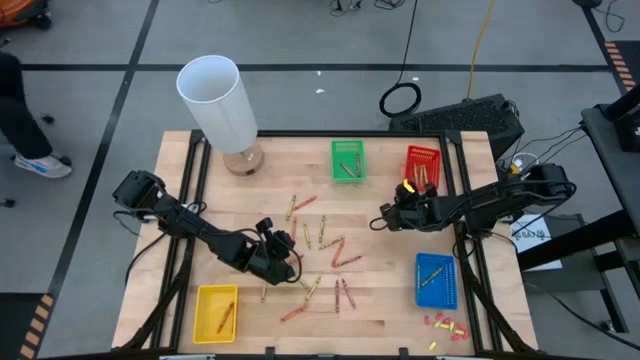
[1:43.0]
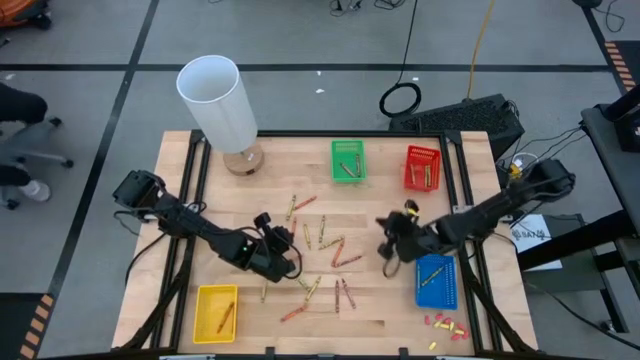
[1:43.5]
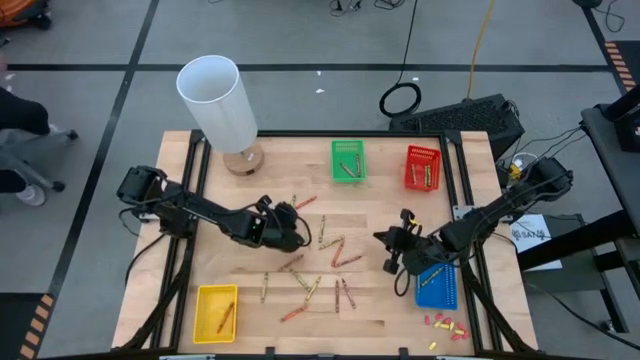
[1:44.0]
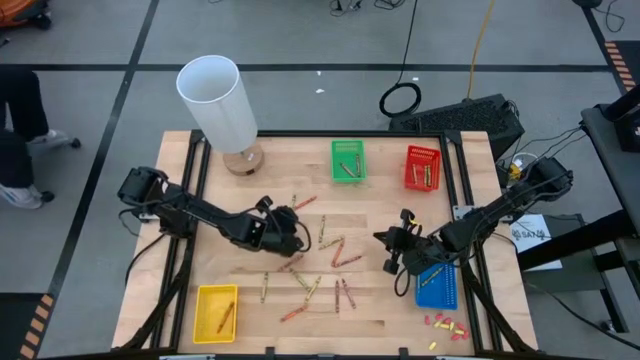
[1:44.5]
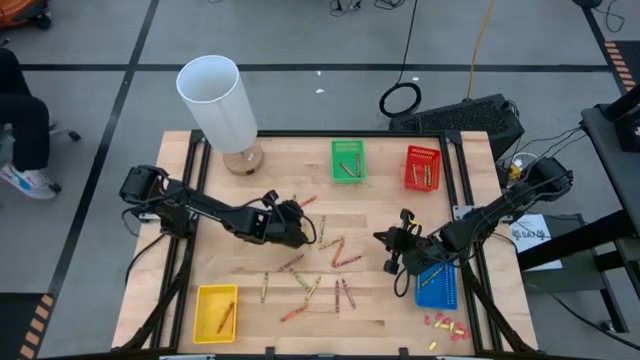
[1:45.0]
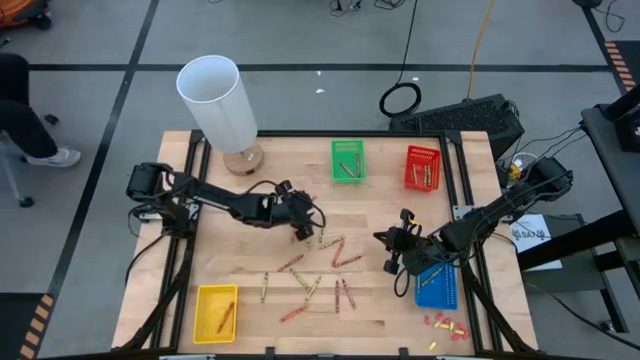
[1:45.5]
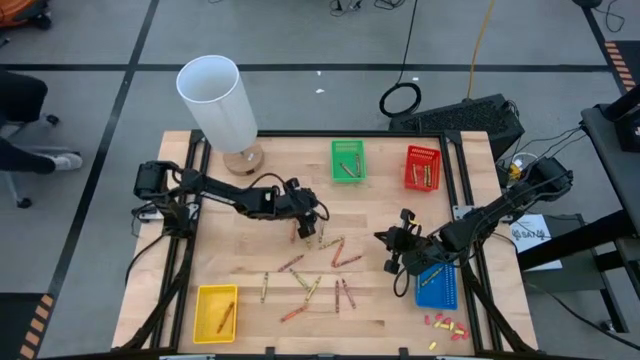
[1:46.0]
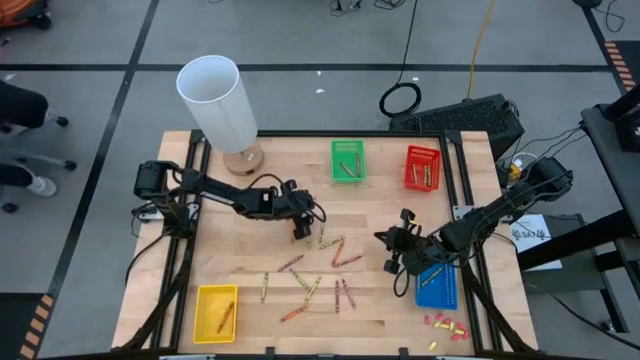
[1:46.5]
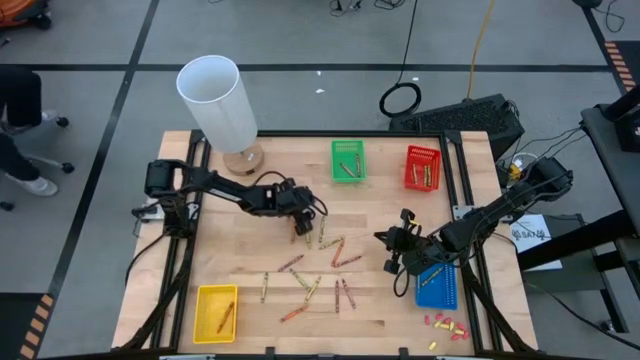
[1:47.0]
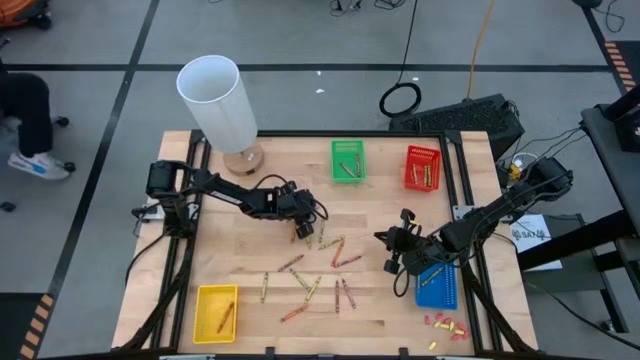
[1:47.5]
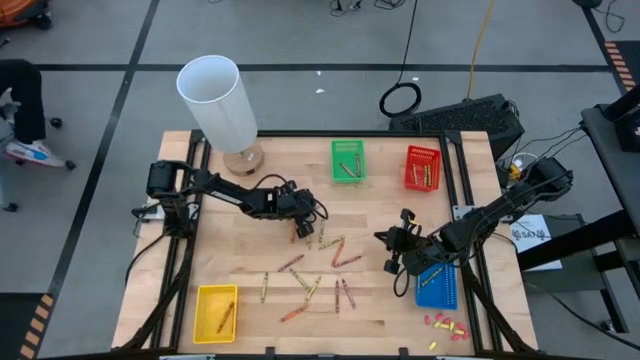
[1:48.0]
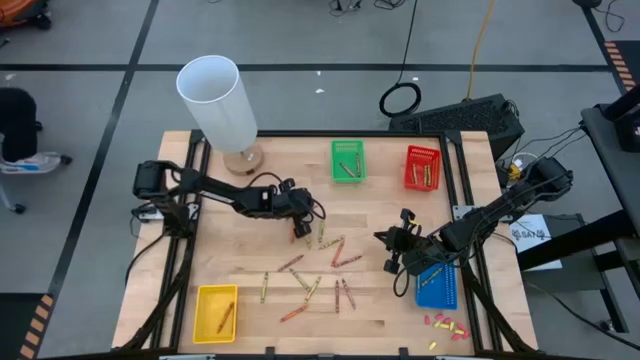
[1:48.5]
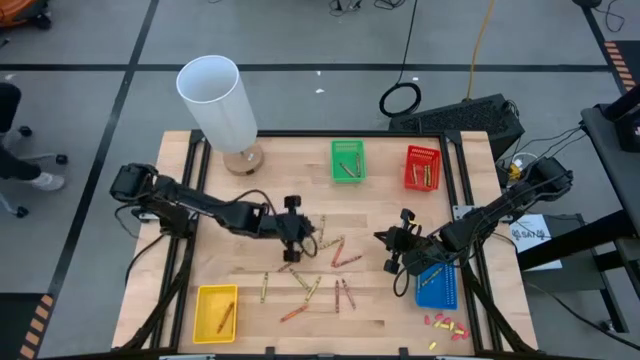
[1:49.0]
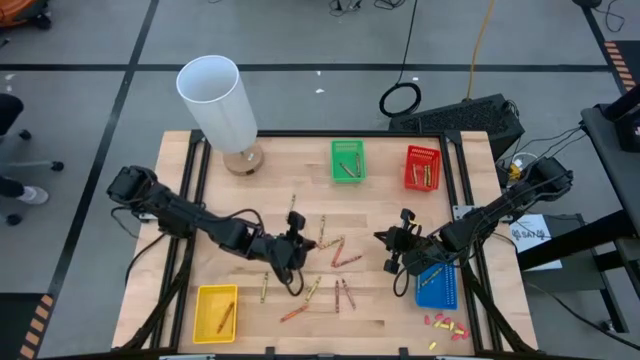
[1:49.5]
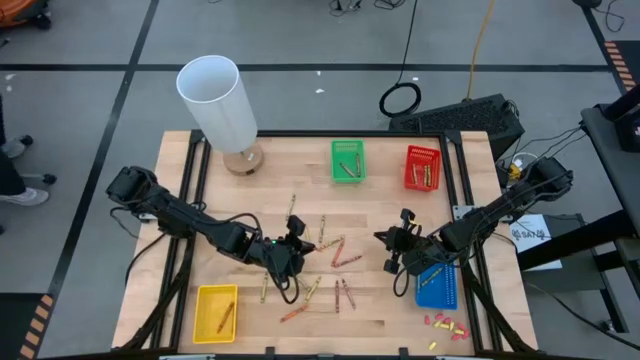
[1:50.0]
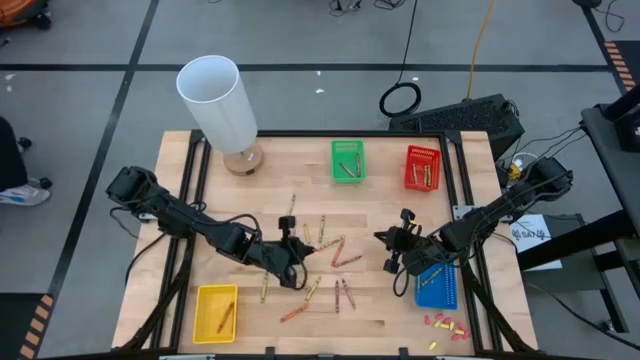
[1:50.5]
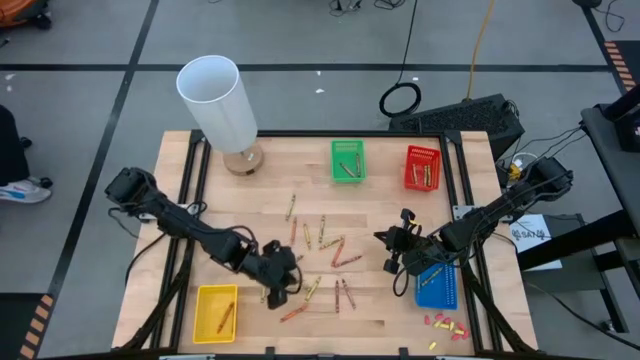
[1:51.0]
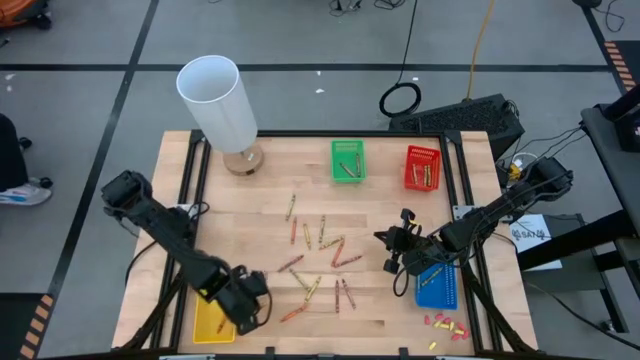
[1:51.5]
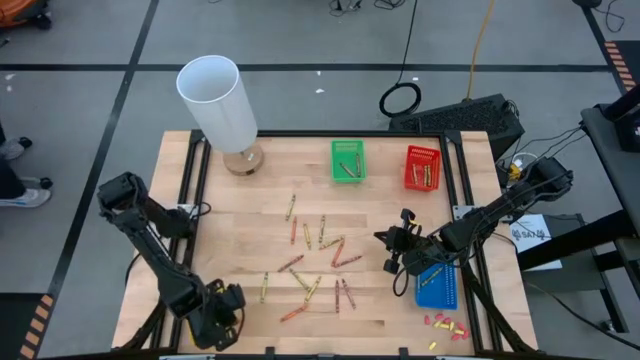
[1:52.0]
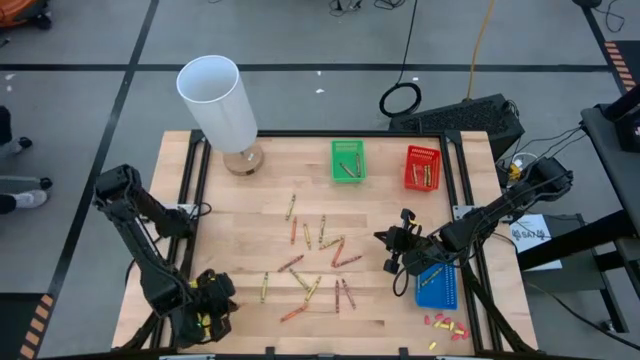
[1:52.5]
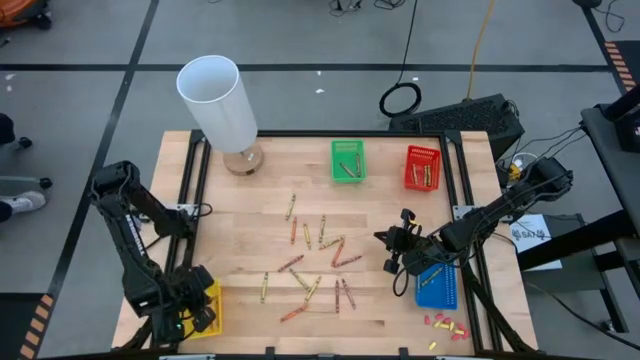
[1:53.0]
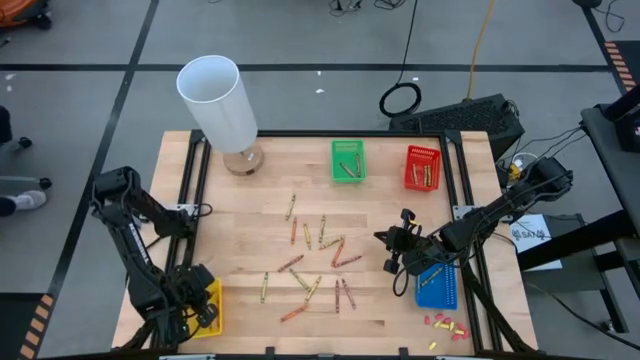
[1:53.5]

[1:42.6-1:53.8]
Task: Sort crayons
Put the orange crayon into the yellow bin

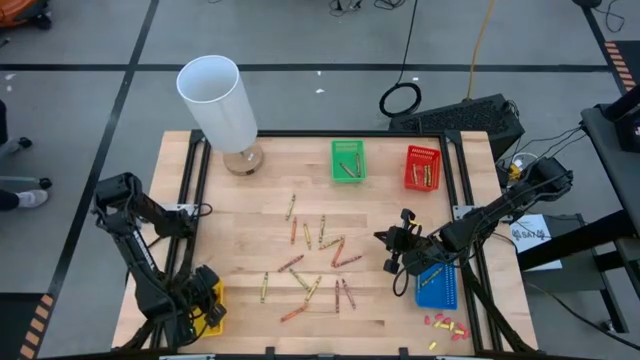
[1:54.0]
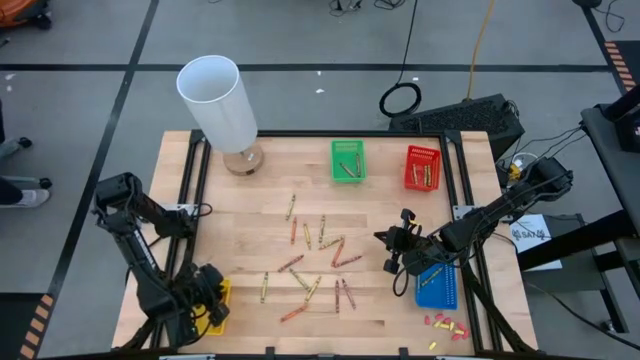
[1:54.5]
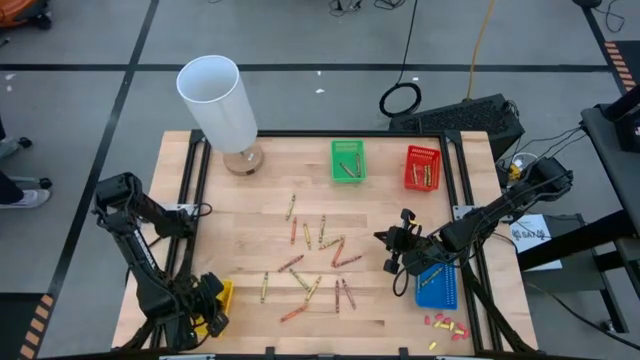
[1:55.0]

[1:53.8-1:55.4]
Adjust the yellow bin

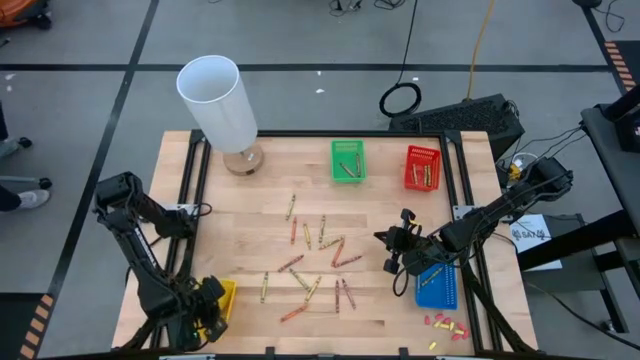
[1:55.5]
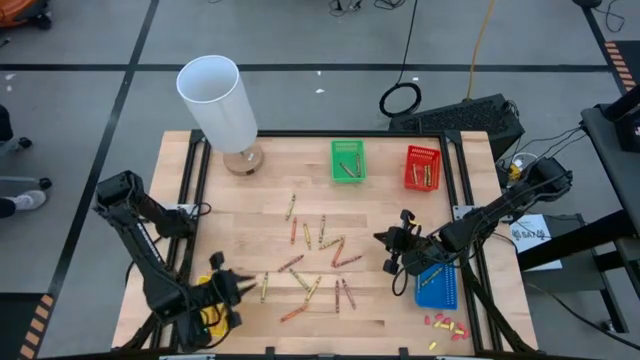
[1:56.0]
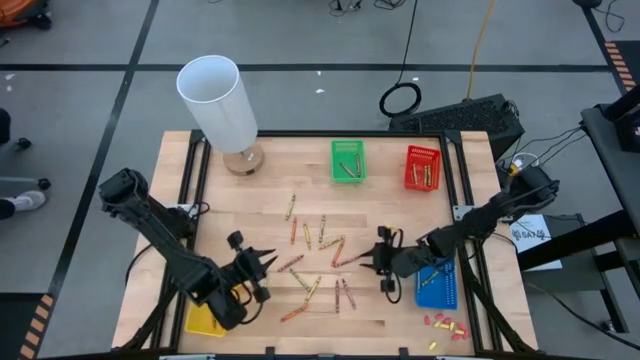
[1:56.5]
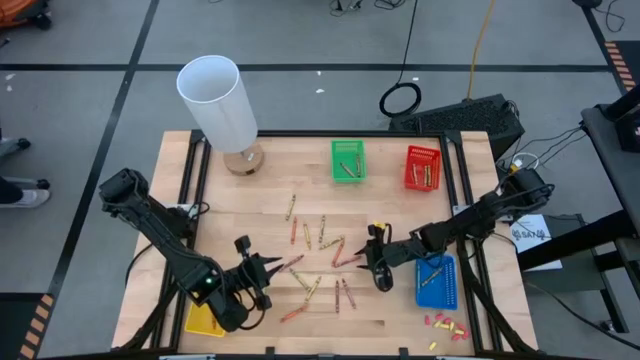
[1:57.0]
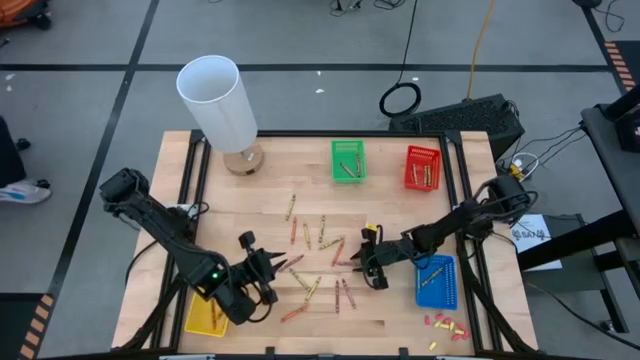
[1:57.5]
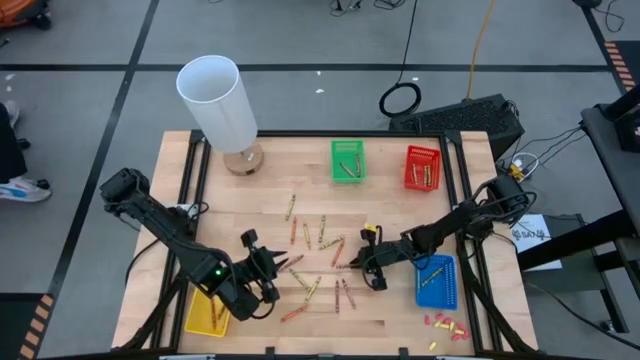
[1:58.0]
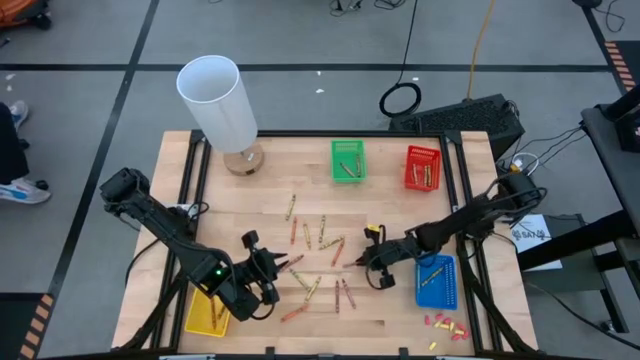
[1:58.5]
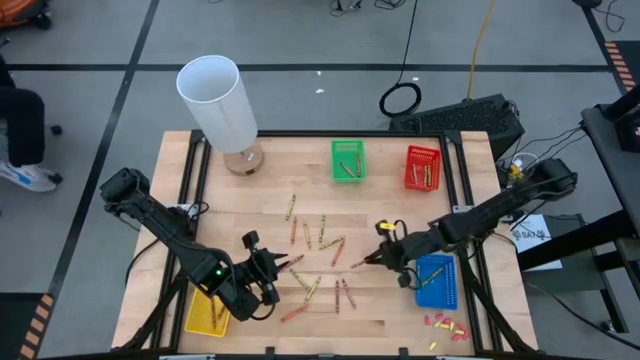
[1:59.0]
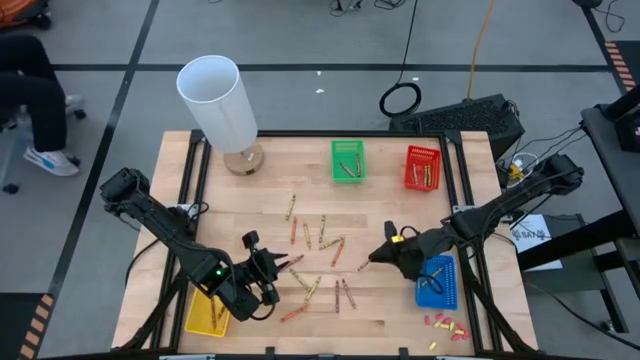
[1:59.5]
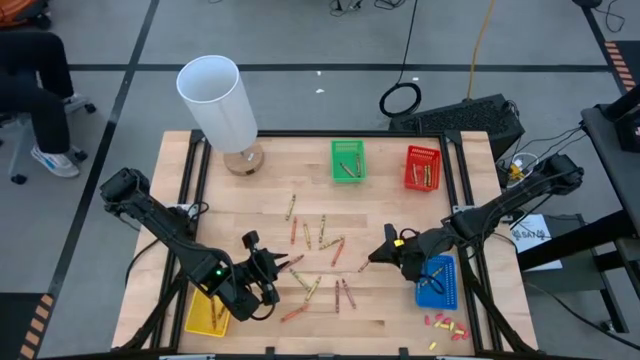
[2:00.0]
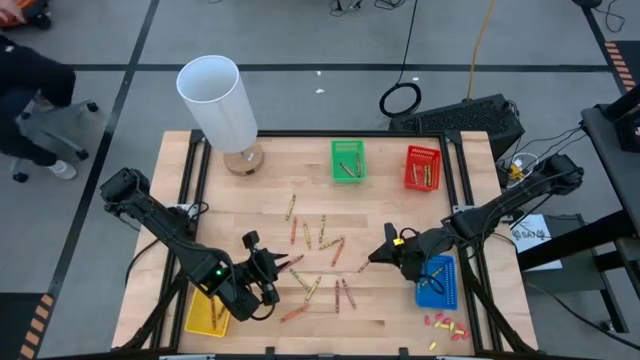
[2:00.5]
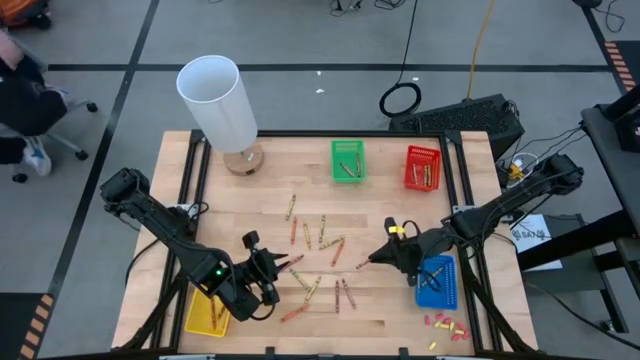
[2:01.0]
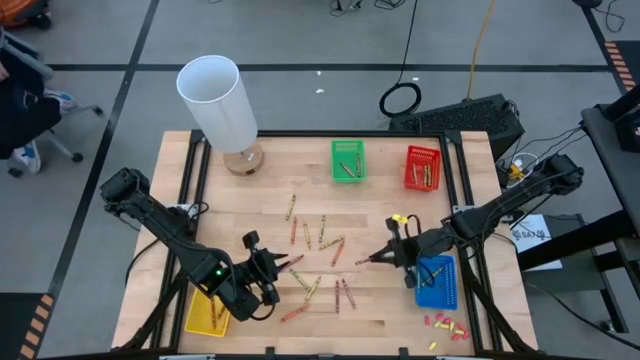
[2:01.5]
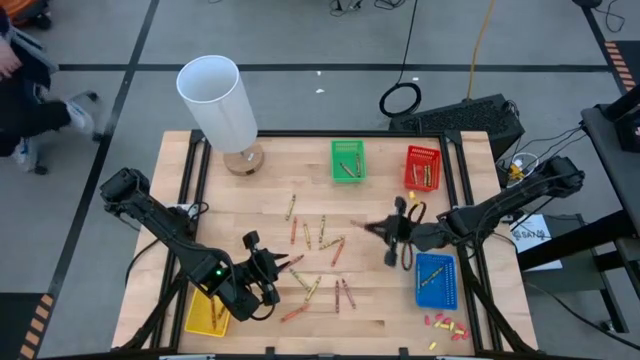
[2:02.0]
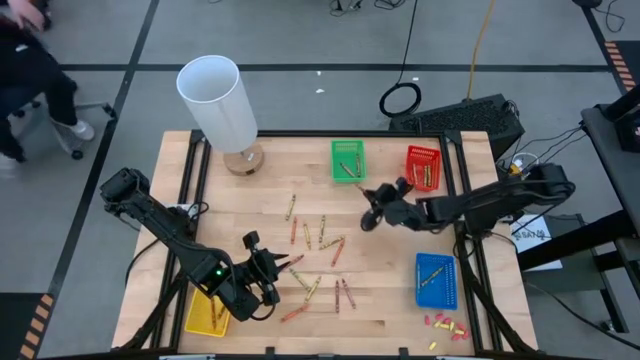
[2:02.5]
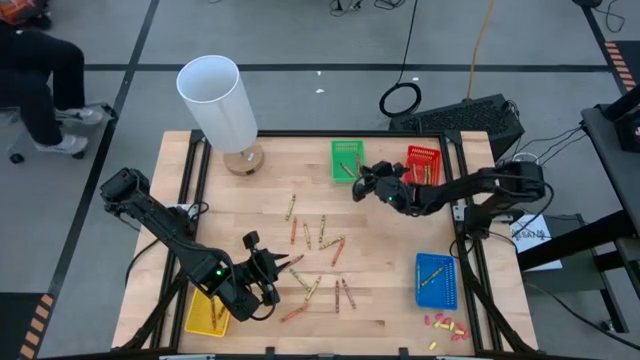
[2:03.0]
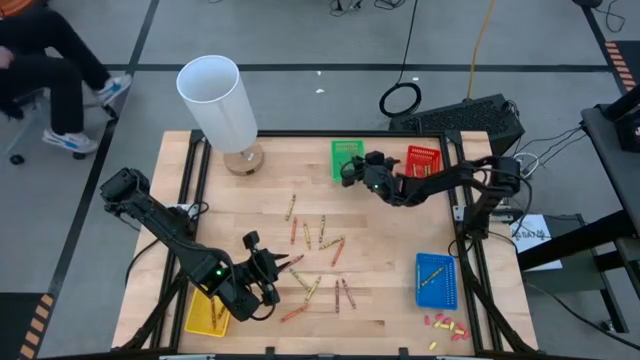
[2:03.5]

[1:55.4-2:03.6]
Put the red crayon into the green bin
